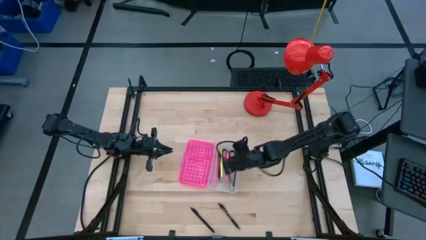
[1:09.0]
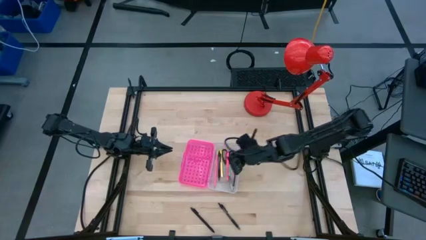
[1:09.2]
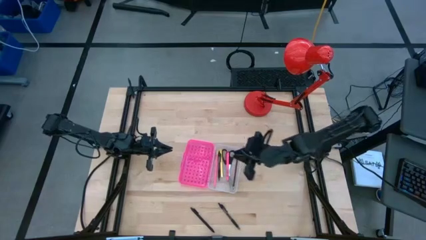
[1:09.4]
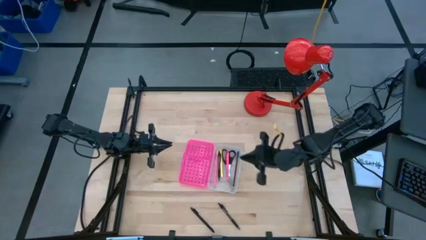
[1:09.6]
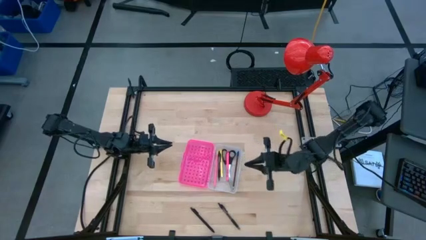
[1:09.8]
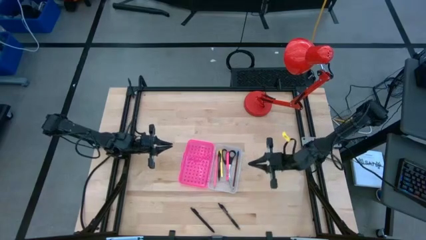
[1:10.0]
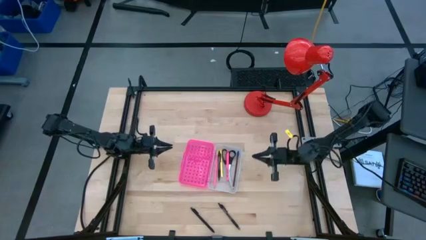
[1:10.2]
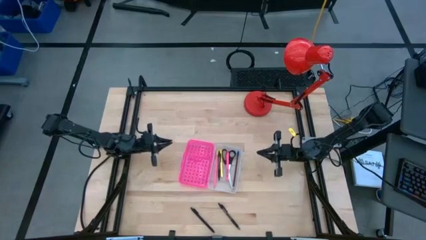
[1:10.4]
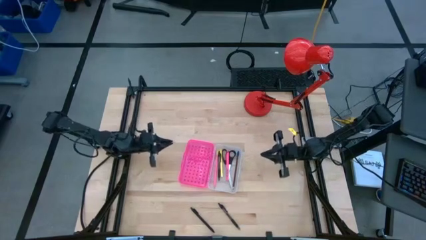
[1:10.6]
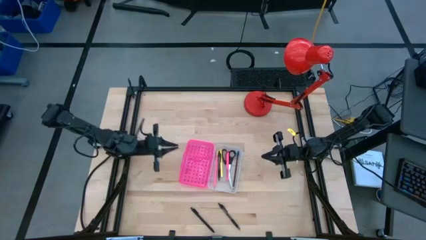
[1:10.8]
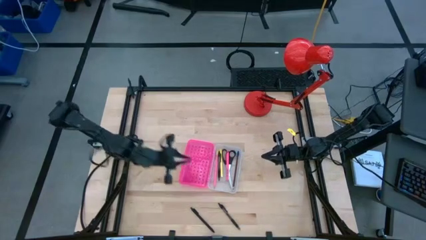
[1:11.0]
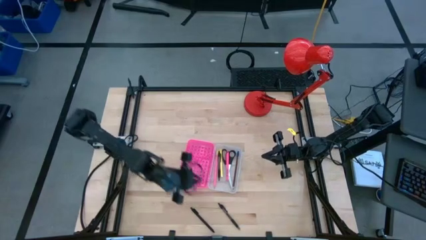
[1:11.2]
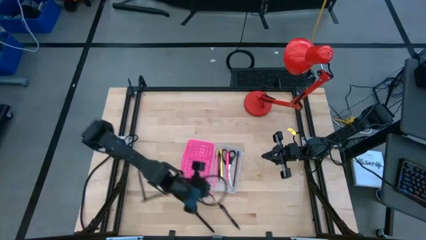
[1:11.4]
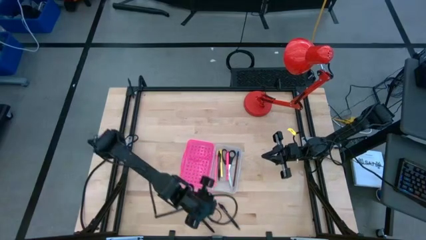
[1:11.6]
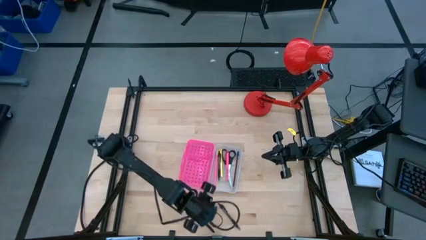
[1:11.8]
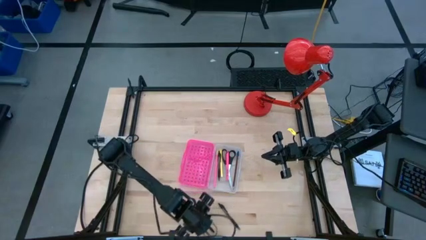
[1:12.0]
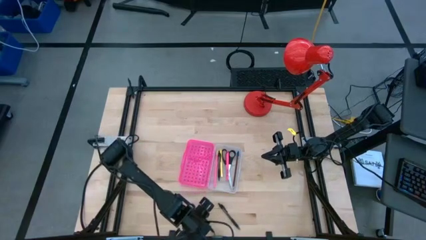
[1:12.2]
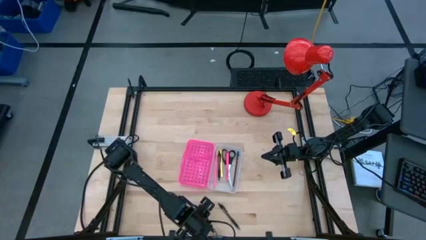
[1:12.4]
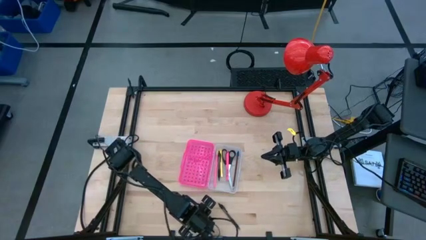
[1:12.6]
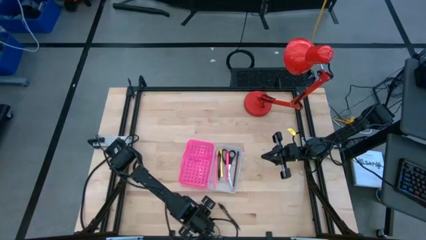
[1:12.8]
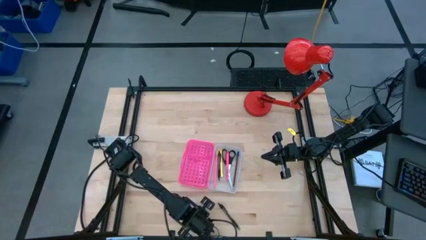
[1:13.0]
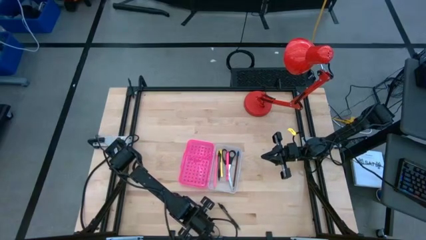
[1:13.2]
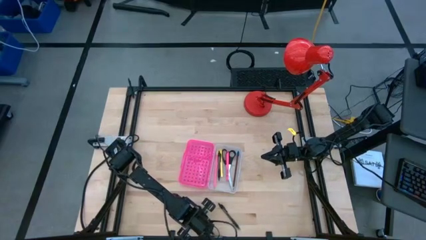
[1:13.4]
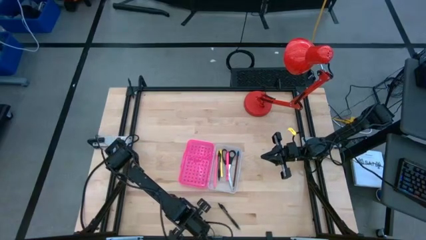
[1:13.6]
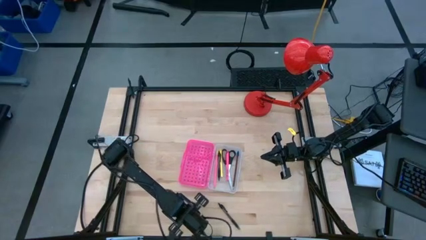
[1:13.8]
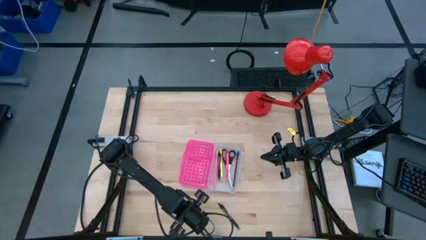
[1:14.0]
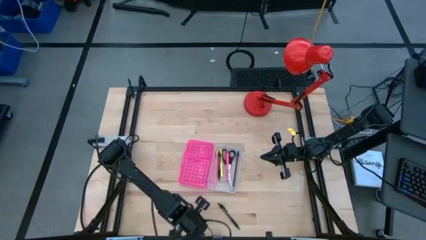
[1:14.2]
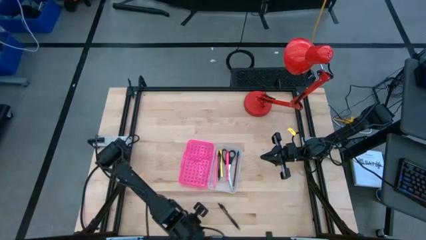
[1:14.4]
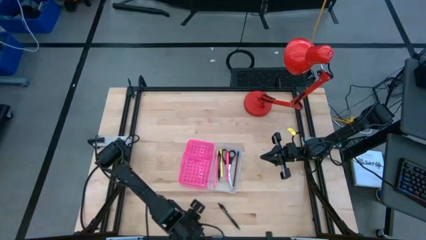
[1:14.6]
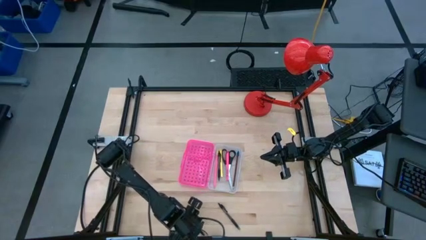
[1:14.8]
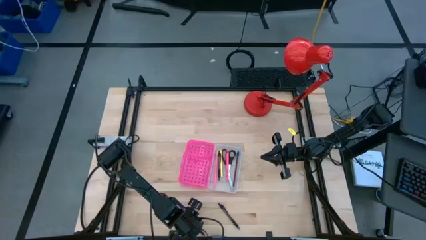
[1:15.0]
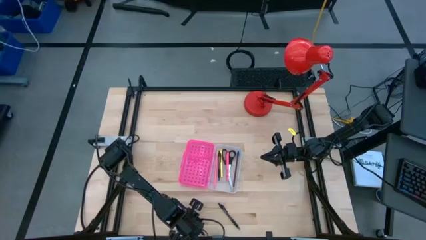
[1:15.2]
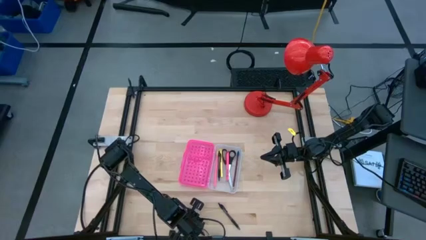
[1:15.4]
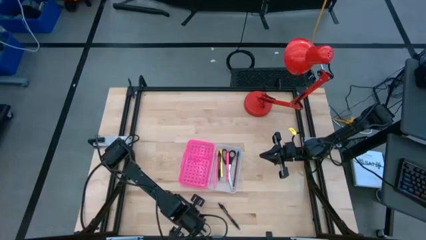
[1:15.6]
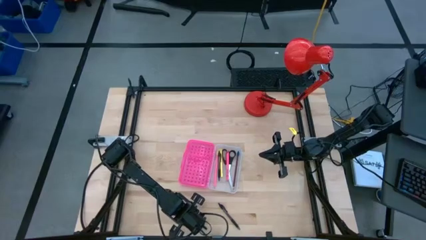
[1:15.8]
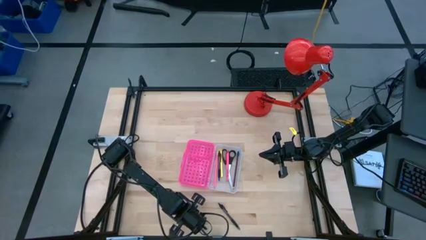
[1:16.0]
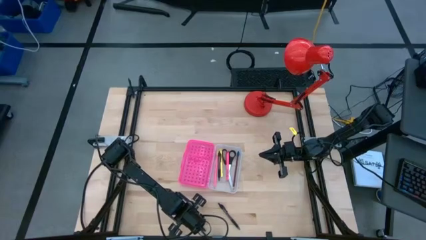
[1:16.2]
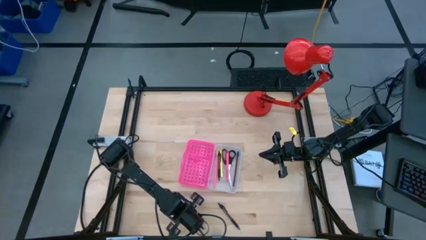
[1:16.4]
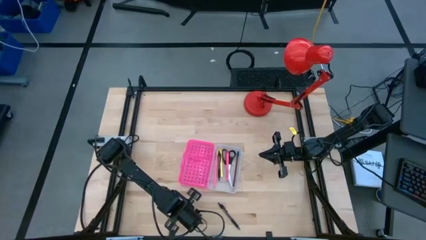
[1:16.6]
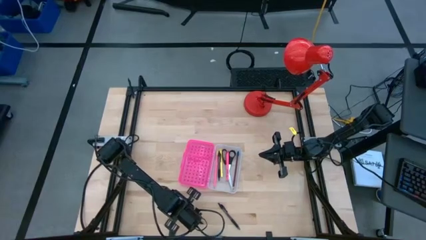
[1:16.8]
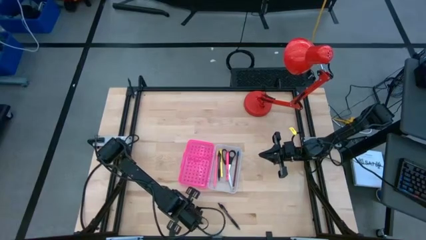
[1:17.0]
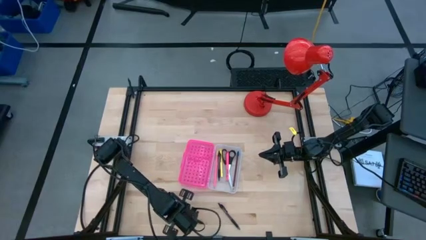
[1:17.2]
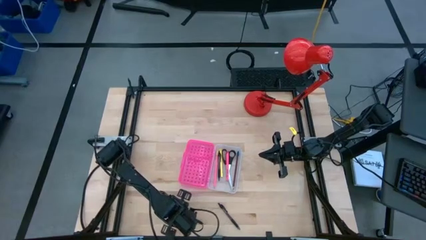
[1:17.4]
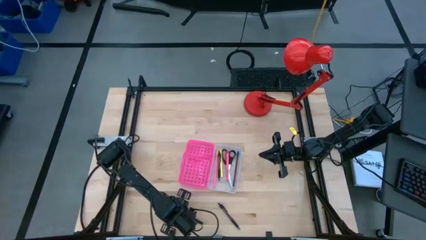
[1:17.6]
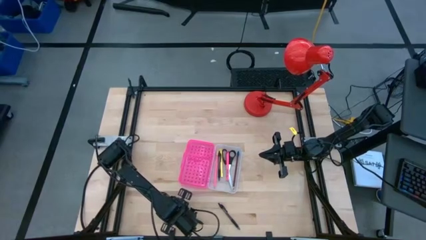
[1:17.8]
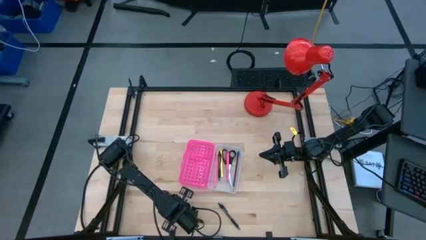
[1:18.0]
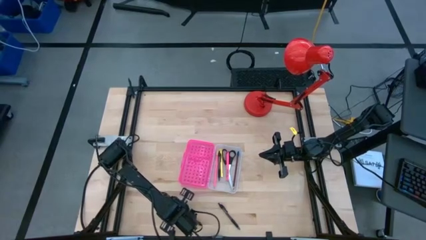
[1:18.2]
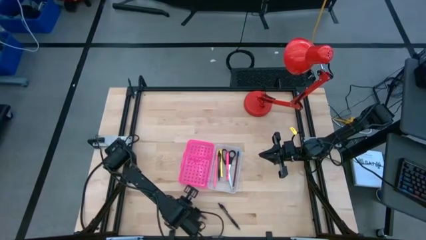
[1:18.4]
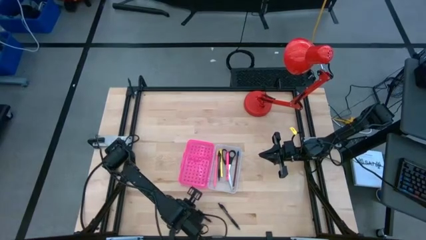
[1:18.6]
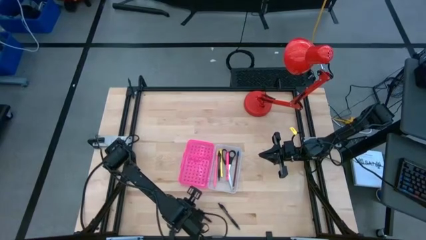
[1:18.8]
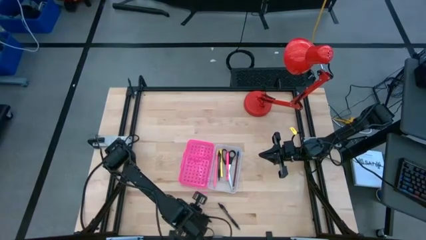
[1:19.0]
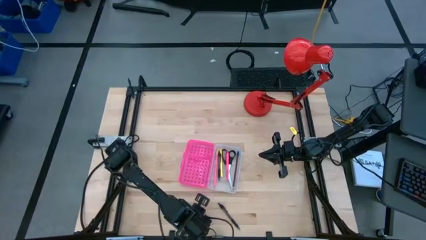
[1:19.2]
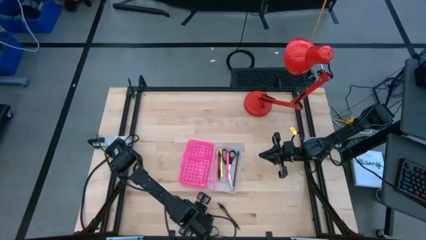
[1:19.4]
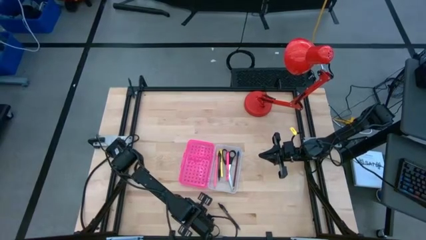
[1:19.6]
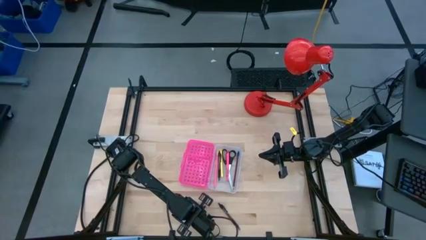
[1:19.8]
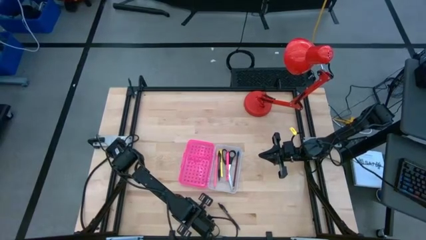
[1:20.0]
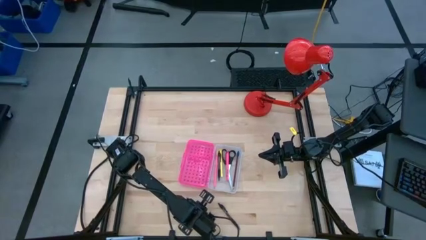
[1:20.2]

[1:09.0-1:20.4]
Task: Pick & place school supplies into a supply box
Put the left black pen into the pink box

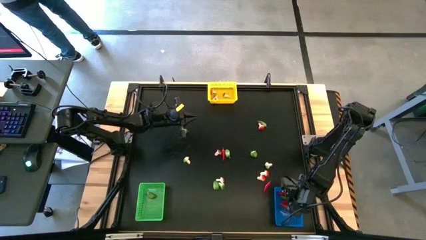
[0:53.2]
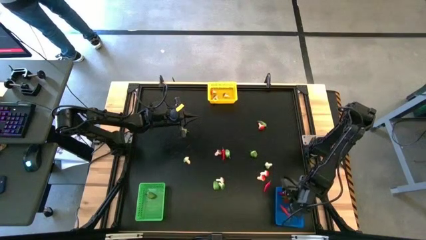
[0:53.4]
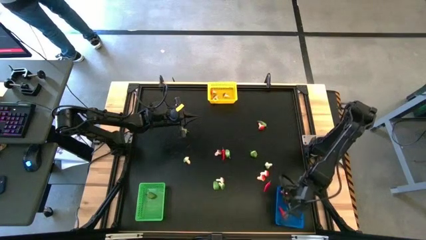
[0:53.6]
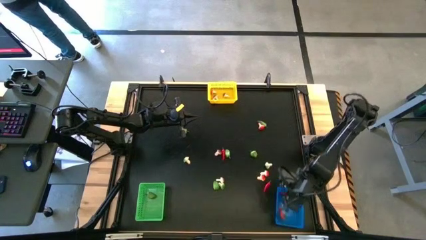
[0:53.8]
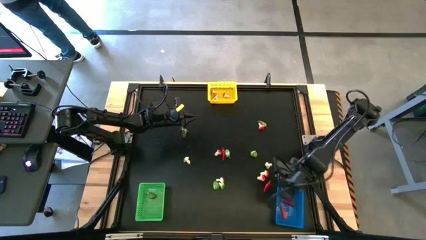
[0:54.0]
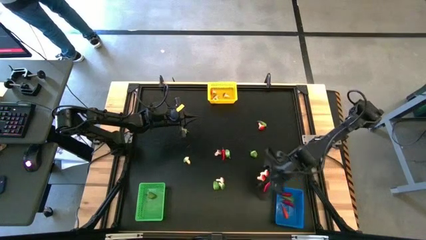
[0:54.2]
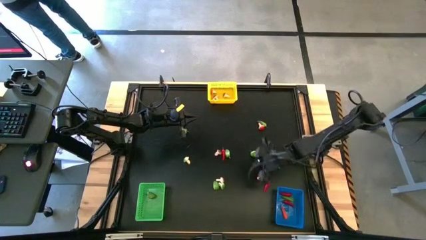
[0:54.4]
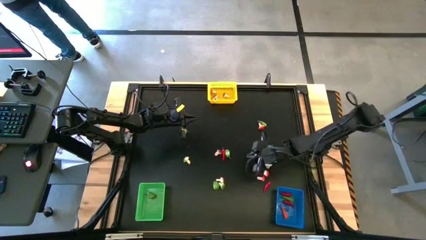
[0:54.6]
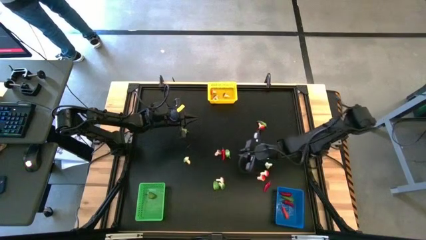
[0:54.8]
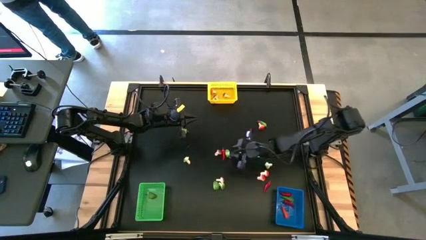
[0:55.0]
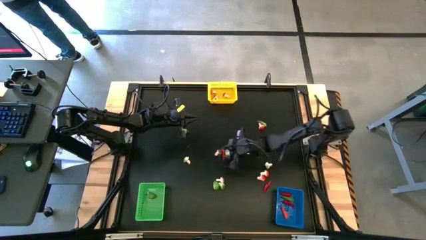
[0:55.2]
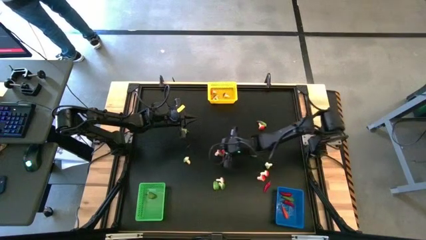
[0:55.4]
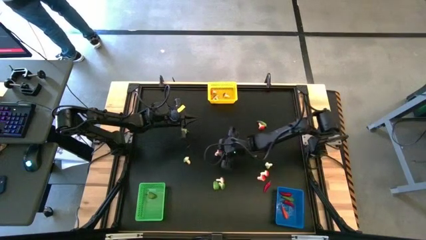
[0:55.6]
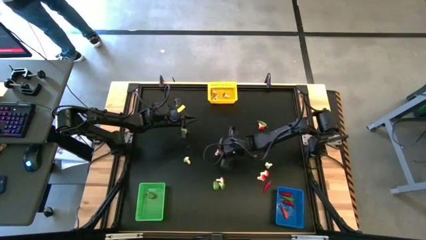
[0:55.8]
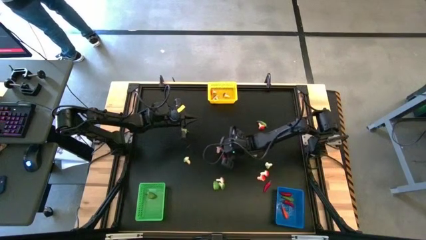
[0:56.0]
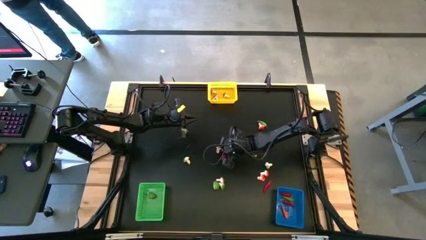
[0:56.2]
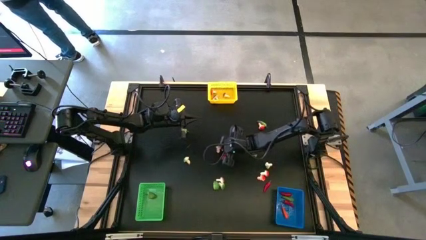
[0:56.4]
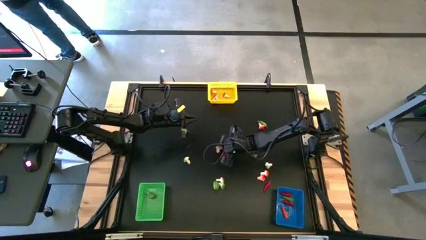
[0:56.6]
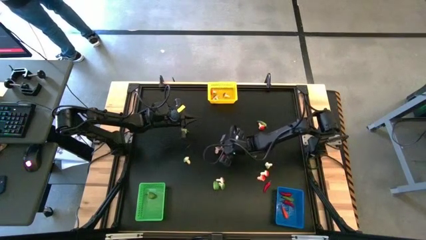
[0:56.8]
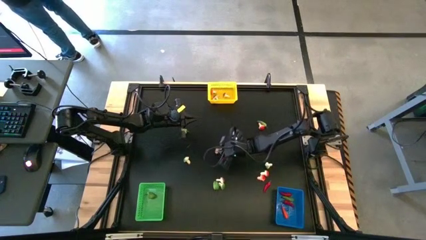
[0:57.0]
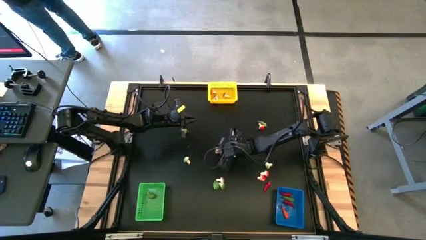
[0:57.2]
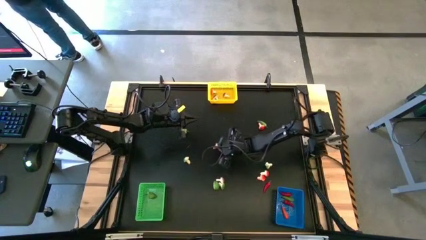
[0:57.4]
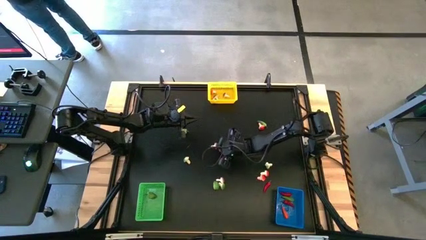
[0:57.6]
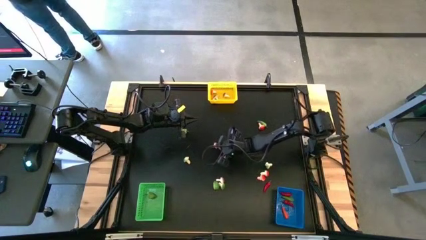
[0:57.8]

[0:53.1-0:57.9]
Task: Sort produce into baskets
Put the center brown mushroom into the yellow bin
